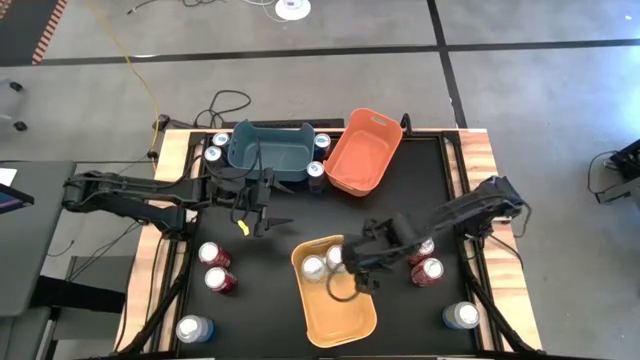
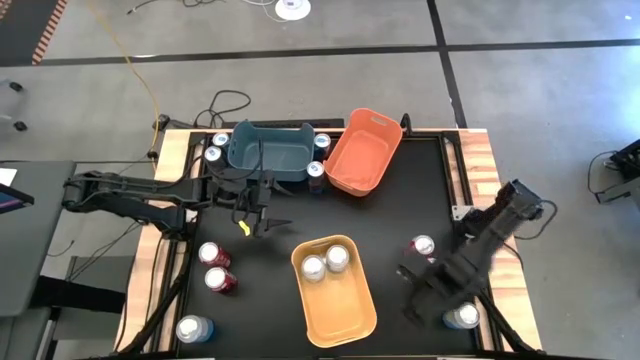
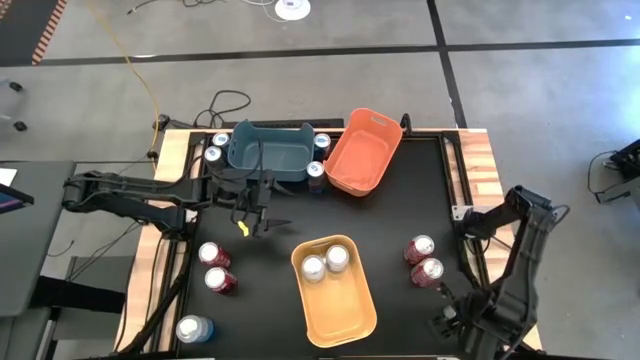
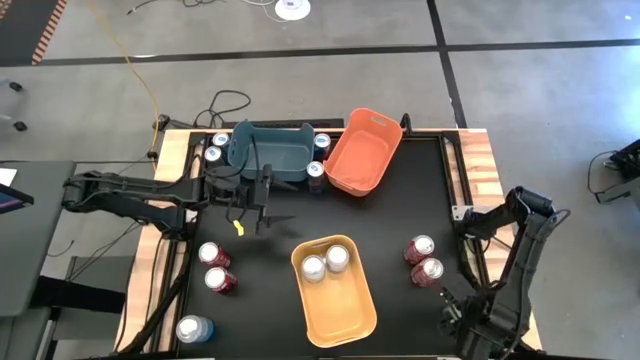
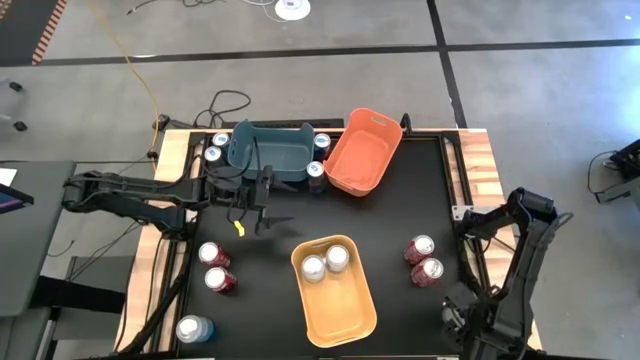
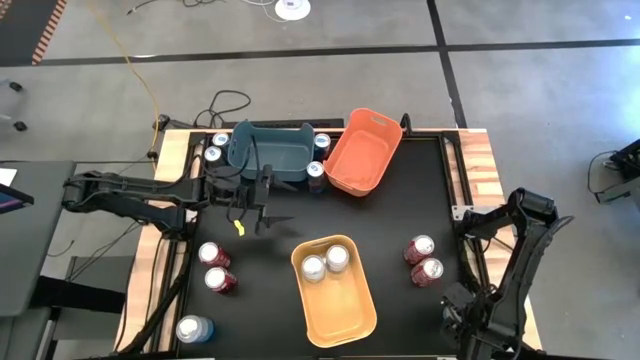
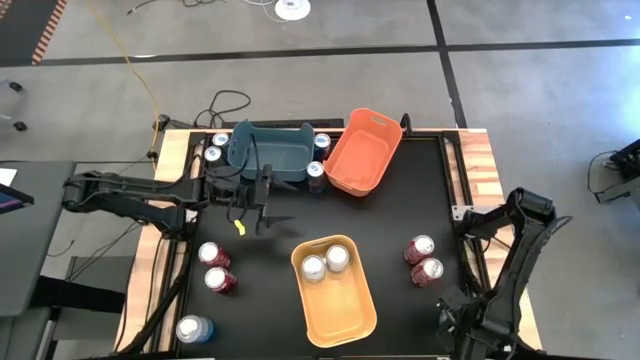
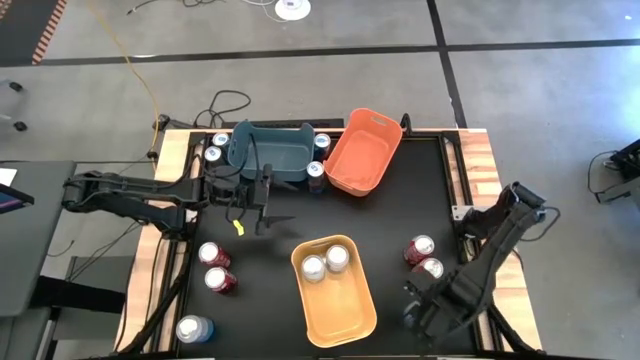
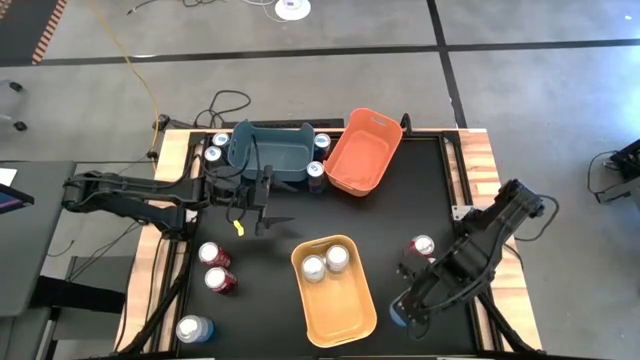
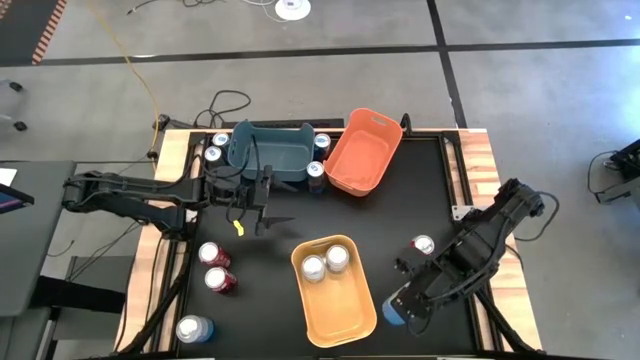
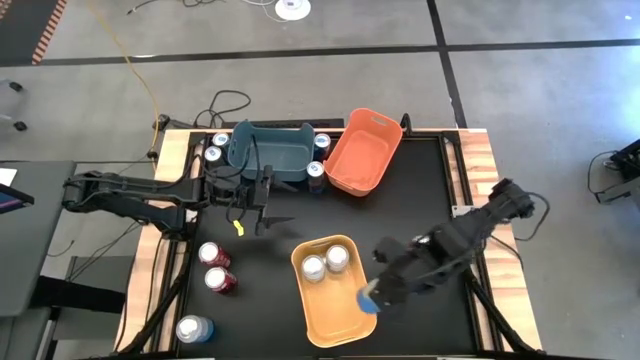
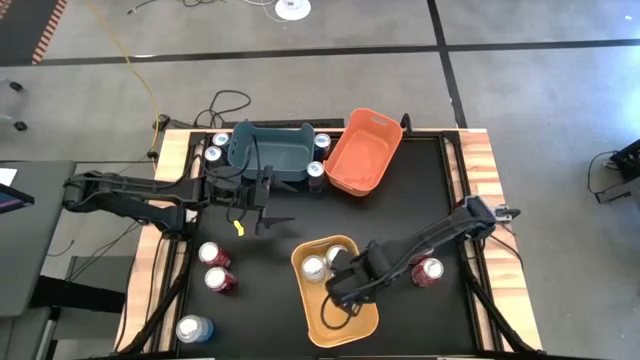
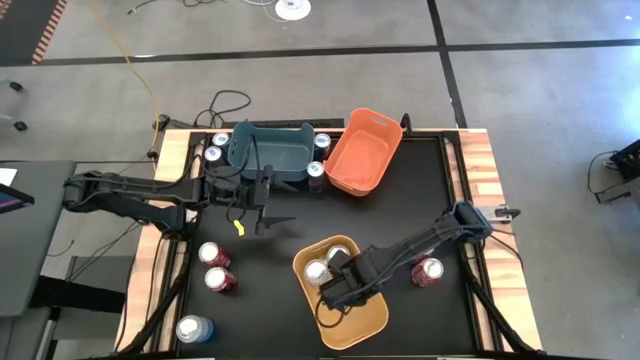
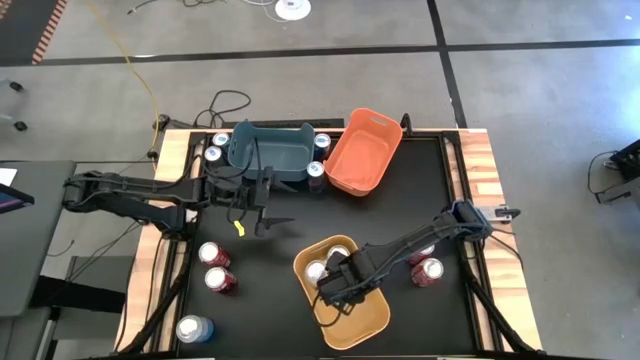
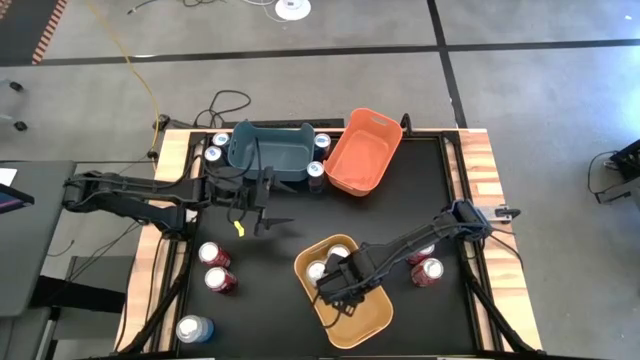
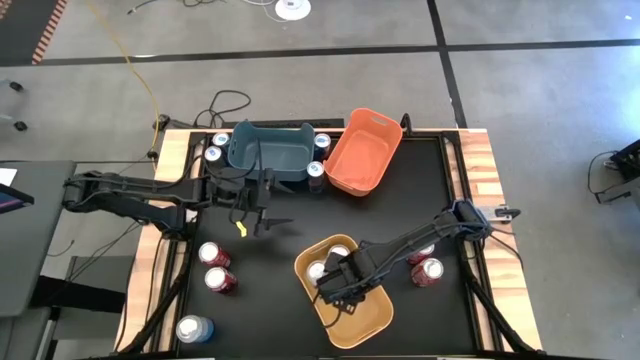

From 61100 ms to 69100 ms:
Task: Sort soda cans
Put the blue white soda can into the yellow bin

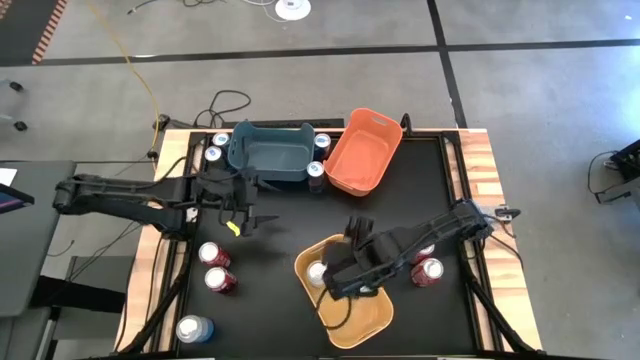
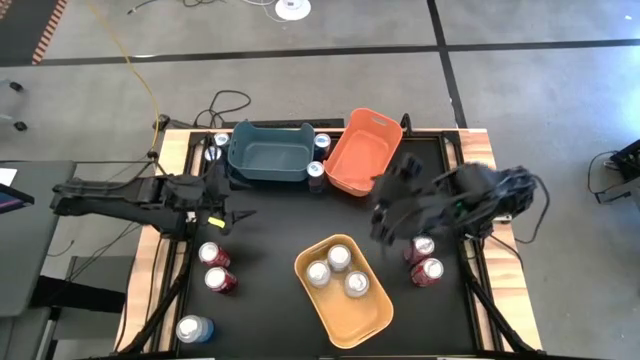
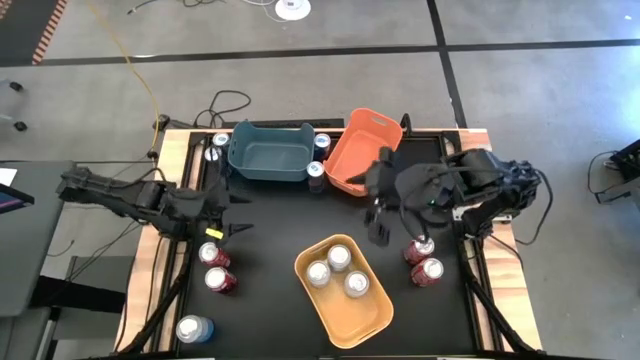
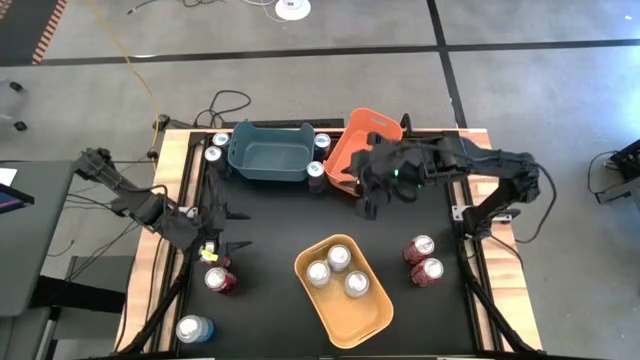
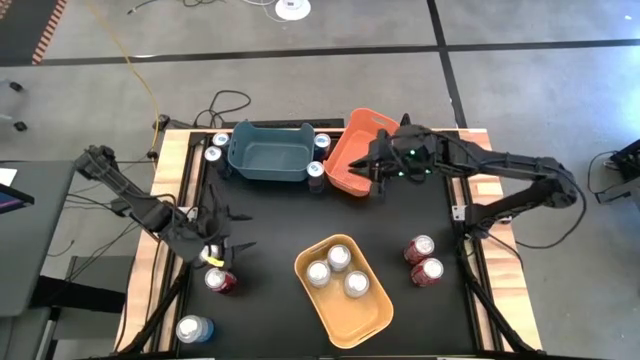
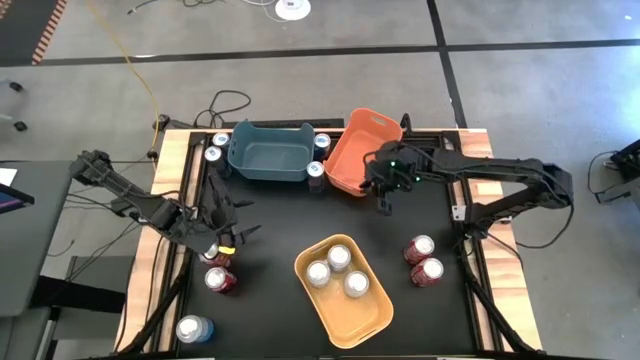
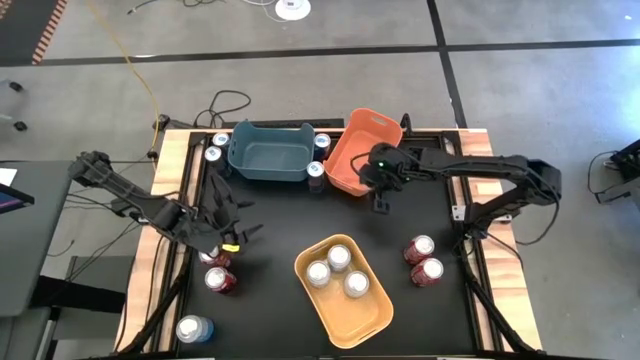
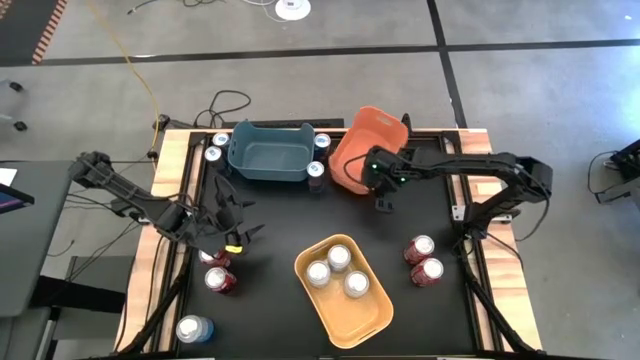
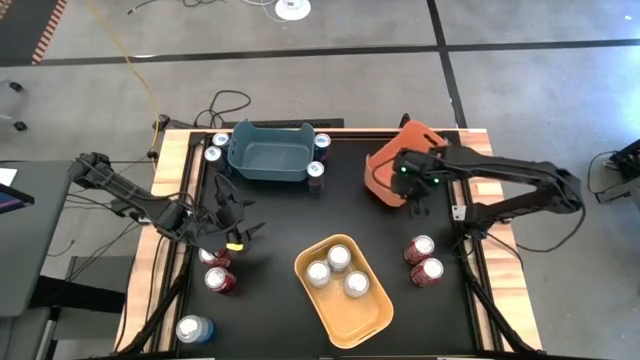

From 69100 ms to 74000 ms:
Move the orange bin to the top right of the table

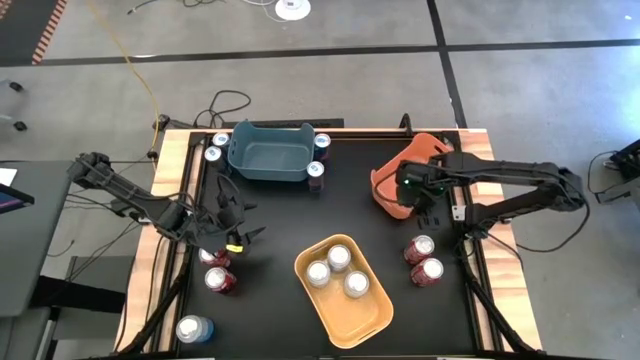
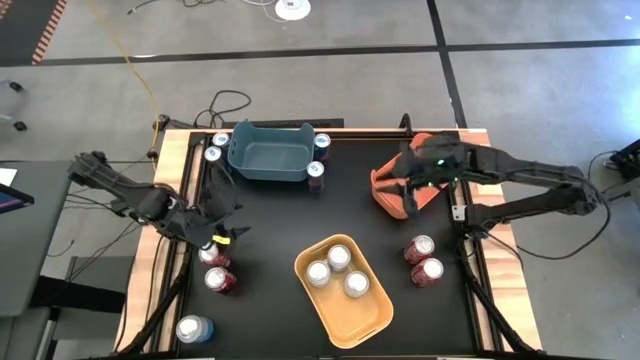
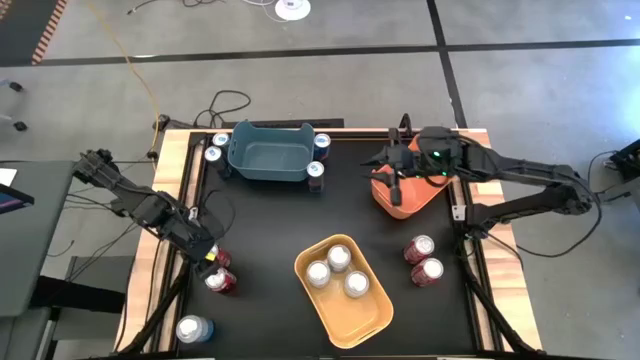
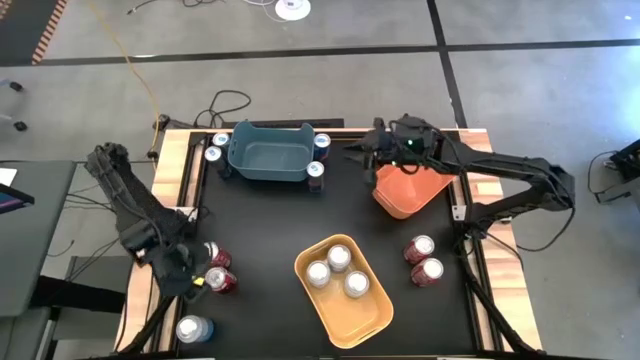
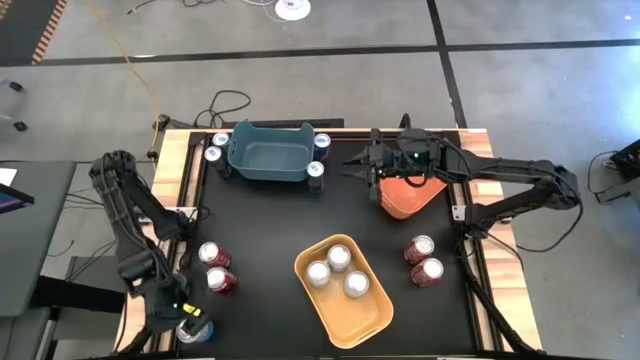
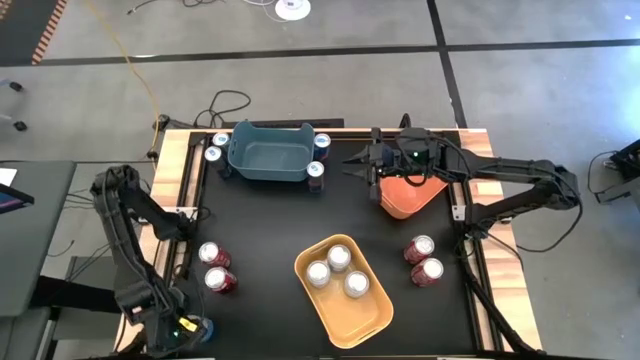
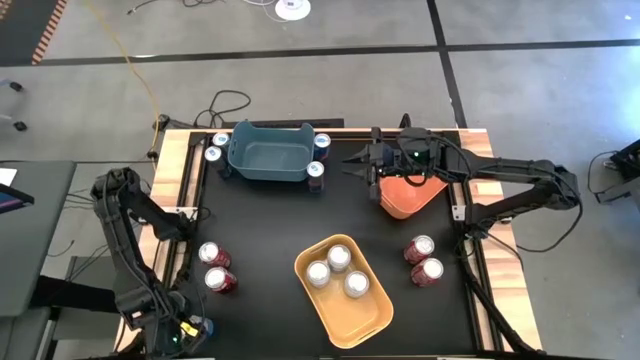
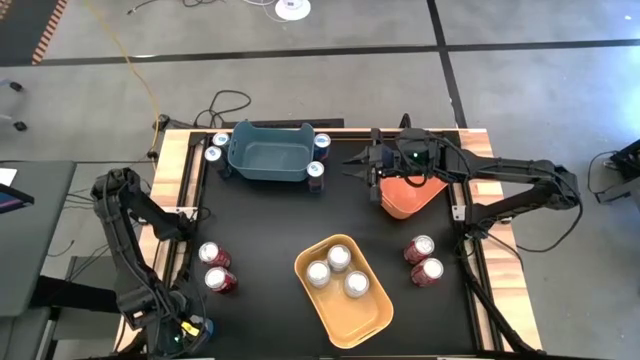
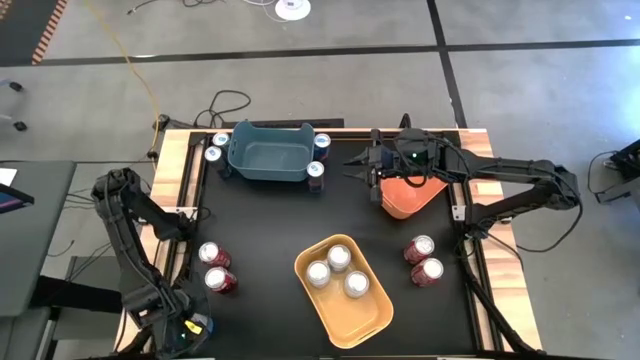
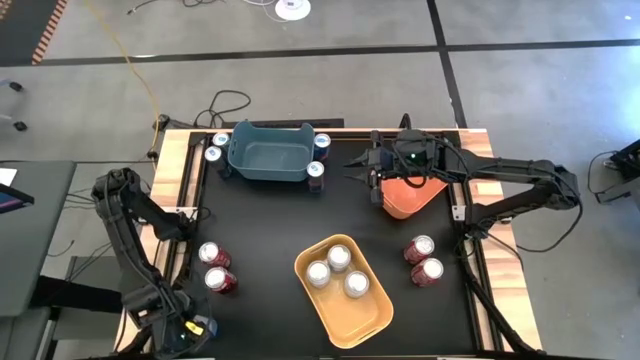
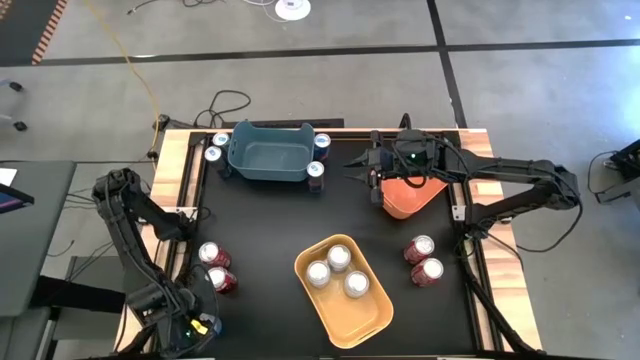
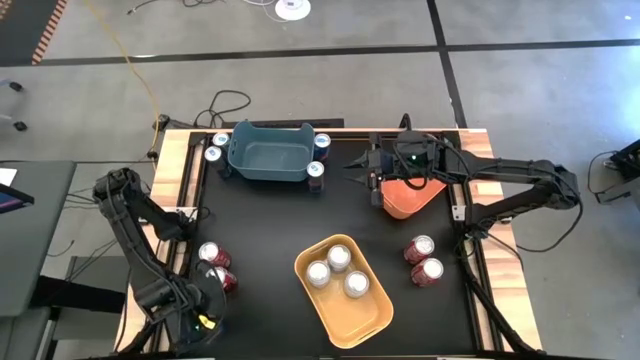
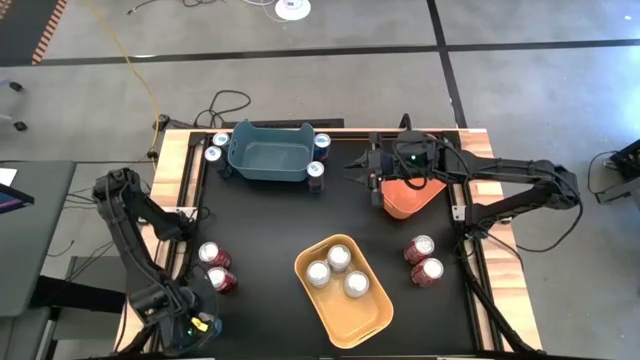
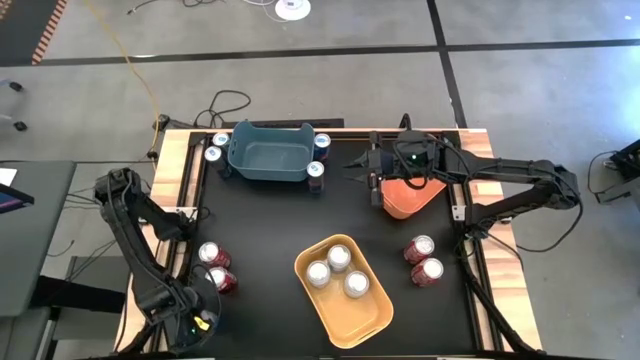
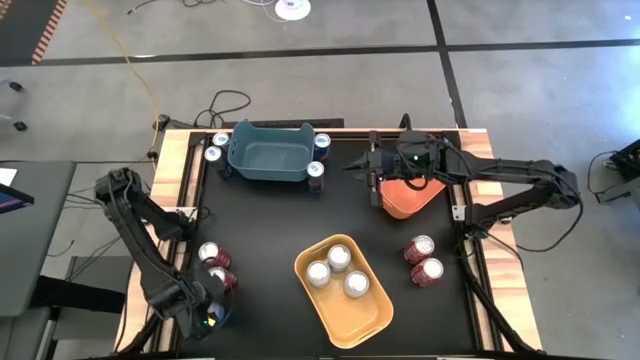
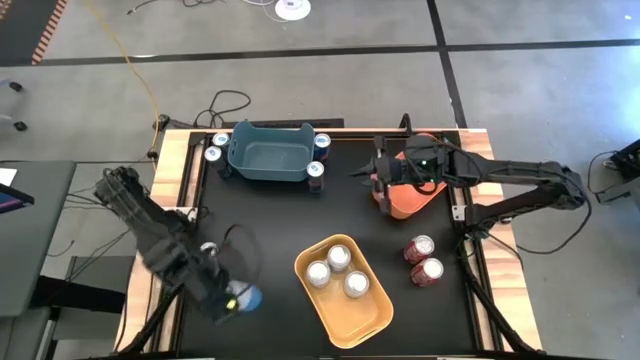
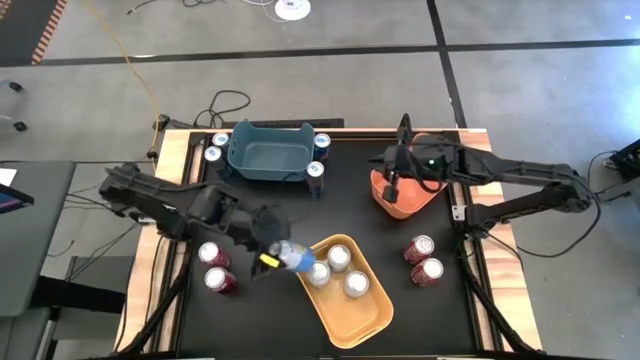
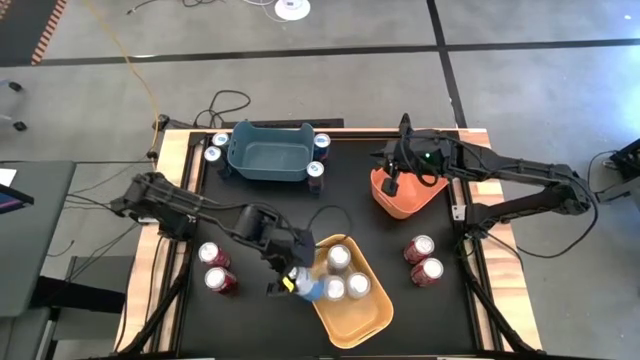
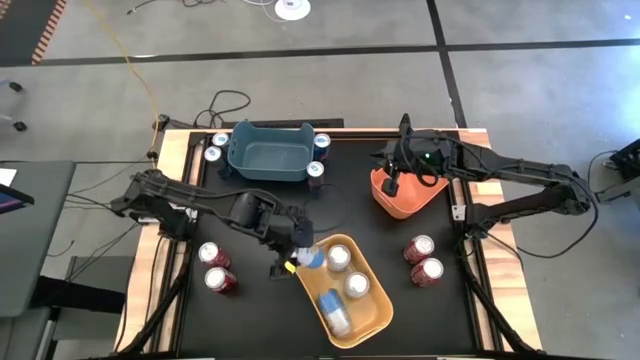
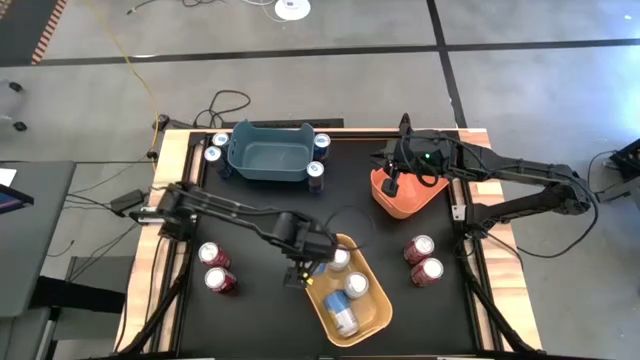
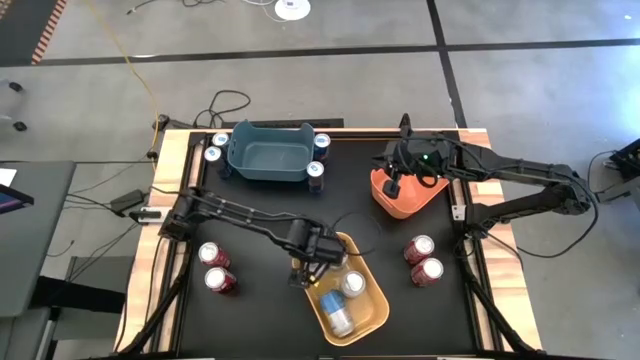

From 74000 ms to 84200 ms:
Put the blue white soda can into the yellow bin
